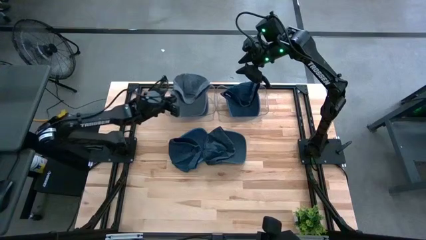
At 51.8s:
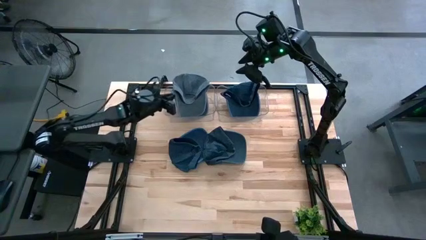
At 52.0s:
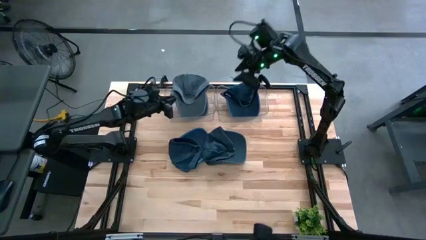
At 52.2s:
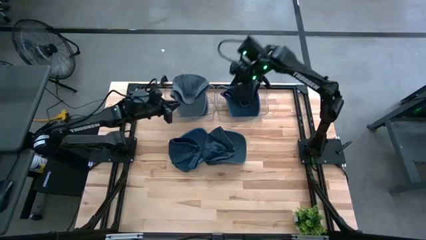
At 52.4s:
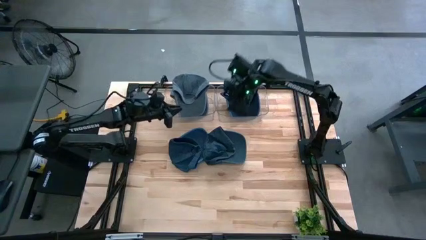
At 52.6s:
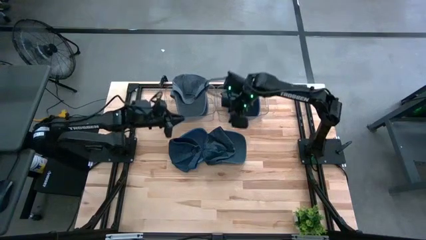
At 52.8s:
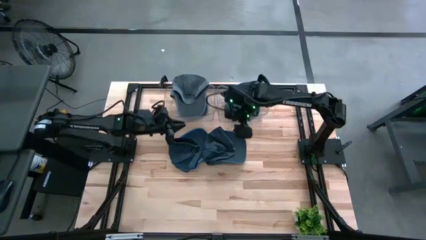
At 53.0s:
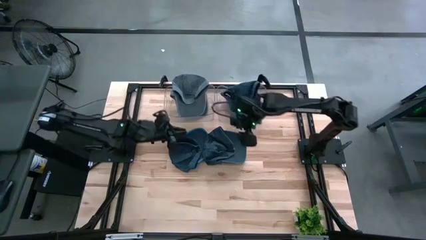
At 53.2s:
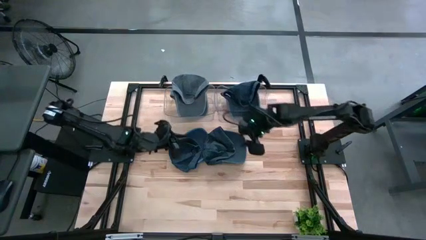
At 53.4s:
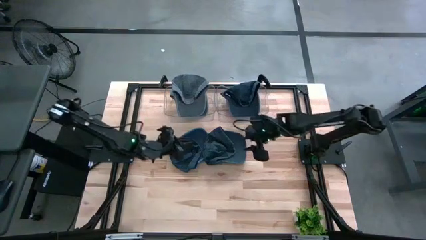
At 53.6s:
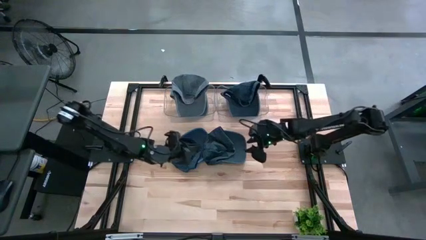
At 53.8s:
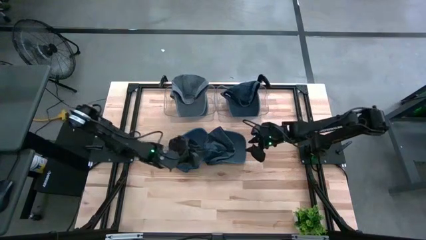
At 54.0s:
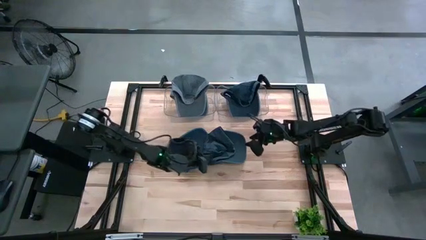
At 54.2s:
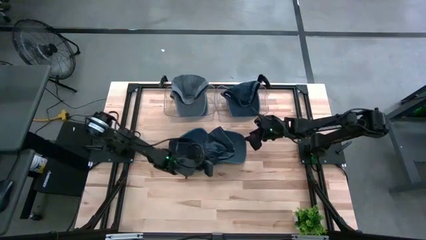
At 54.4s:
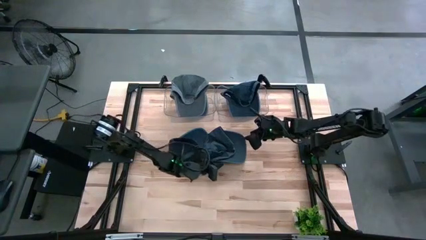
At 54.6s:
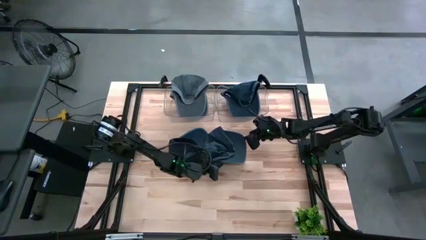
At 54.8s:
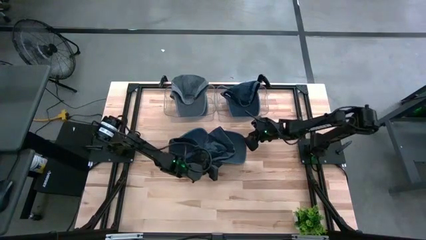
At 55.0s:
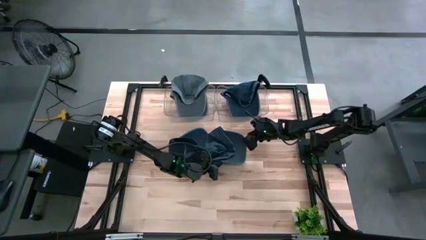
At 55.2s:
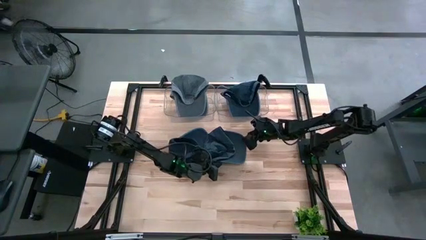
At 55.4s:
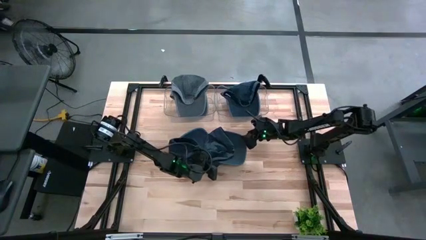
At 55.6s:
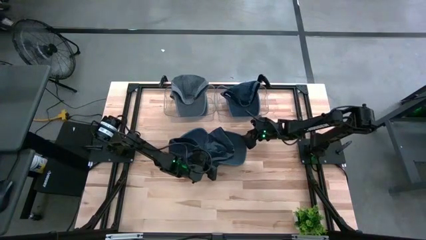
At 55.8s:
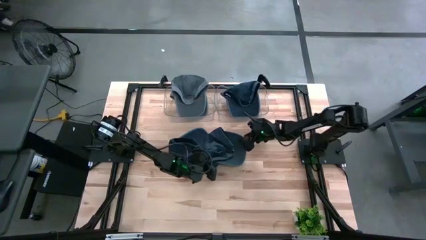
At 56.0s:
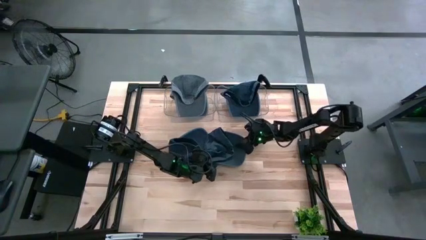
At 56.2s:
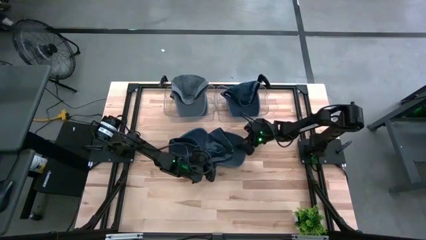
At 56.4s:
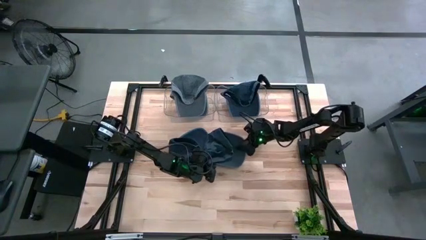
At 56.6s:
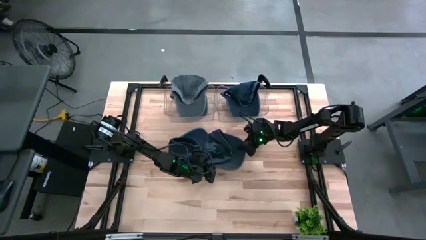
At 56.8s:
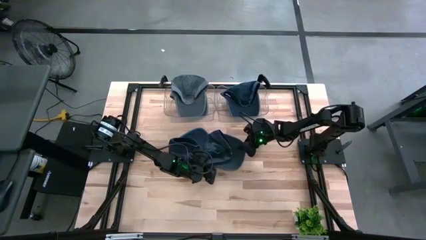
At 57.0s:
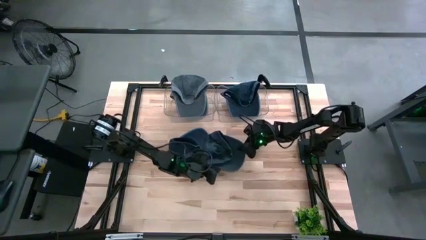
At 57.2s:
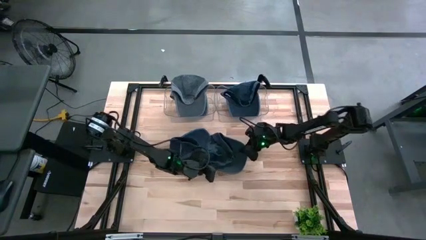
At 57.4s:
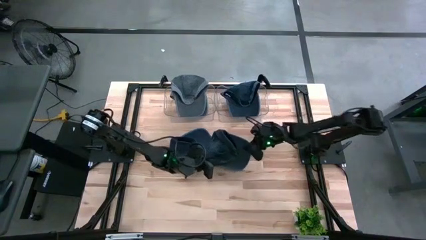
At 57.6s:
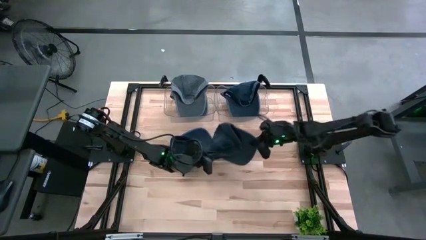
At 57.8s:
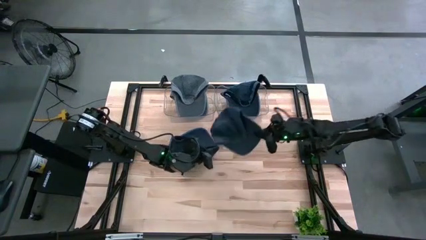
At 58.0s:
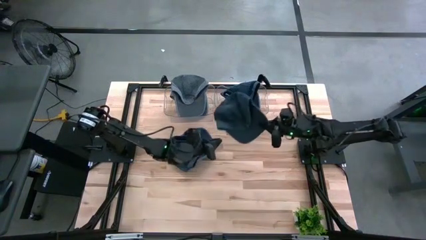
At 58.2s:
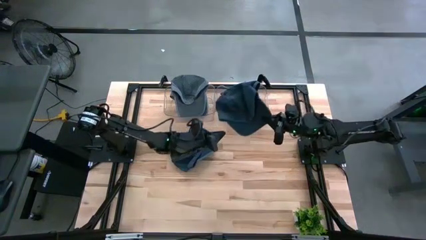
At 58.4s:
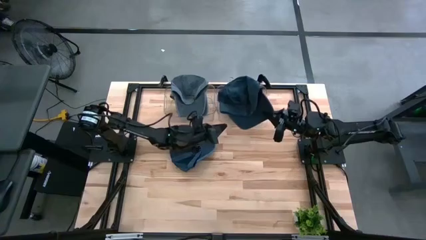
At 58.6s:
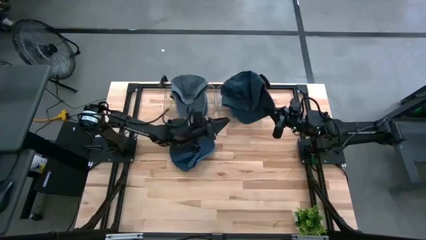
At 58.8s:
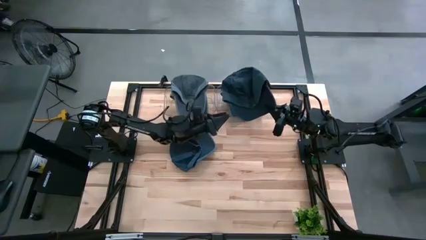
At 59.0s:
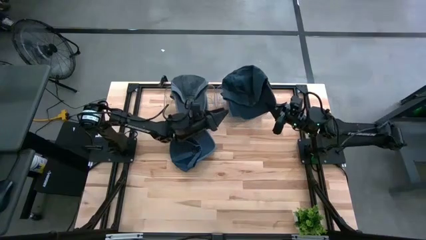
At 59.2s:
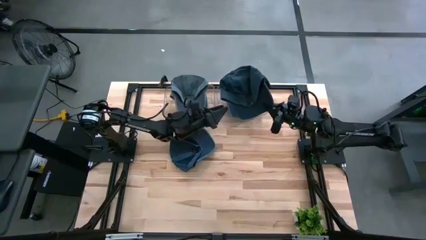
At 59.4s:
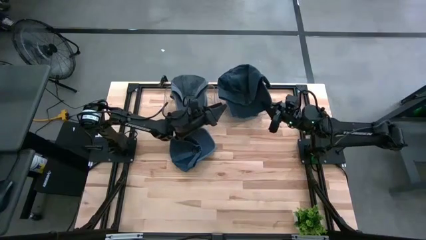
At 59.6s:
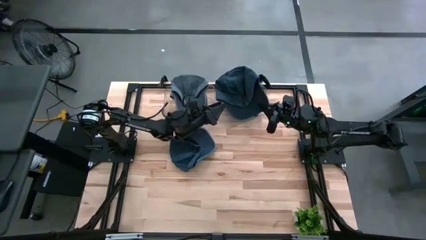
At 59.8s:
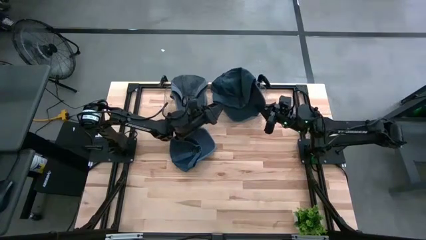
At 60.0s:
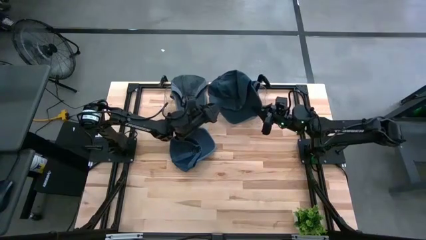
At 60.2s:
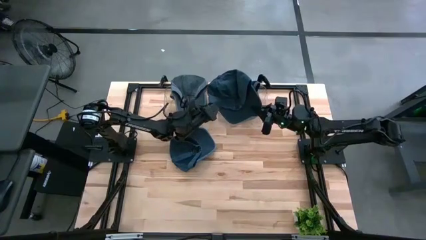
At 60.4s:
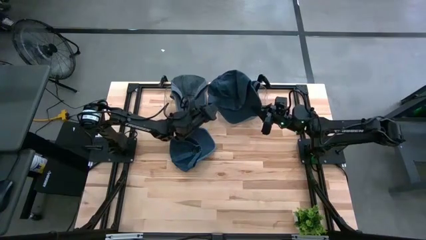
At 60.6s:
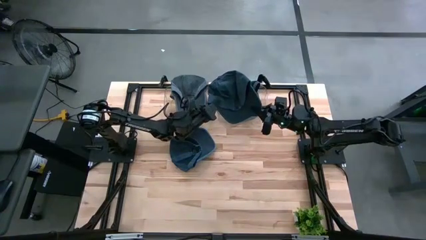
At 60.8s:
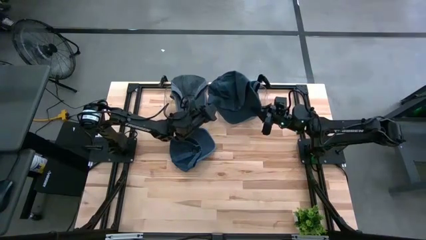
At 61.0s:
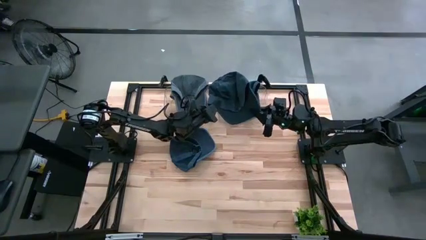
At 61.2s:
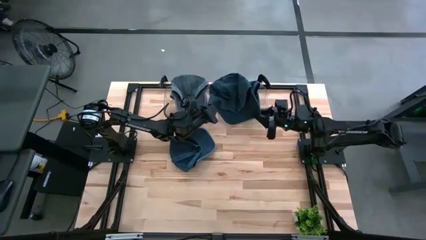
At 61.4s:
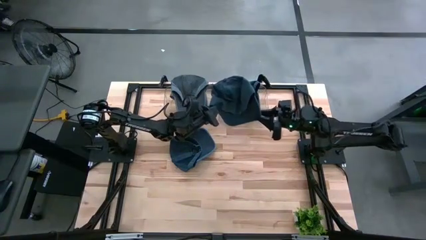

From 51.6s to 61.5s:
Task: Pick & Place hat
Put the dark blue cap into the right transparent bin
